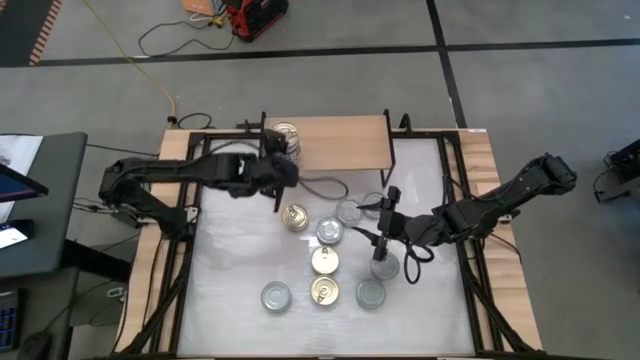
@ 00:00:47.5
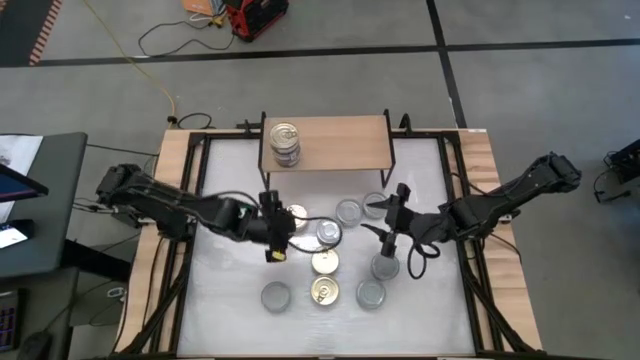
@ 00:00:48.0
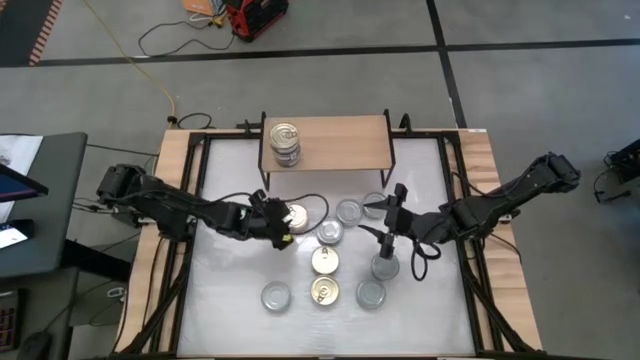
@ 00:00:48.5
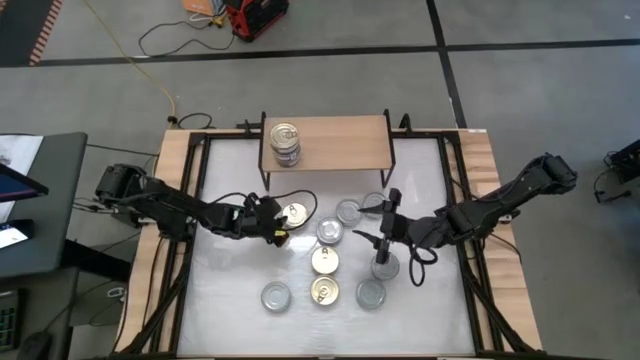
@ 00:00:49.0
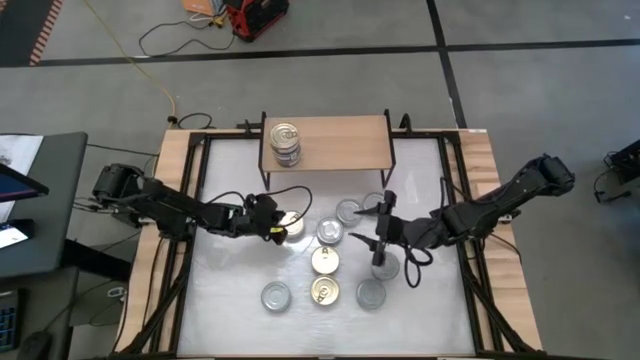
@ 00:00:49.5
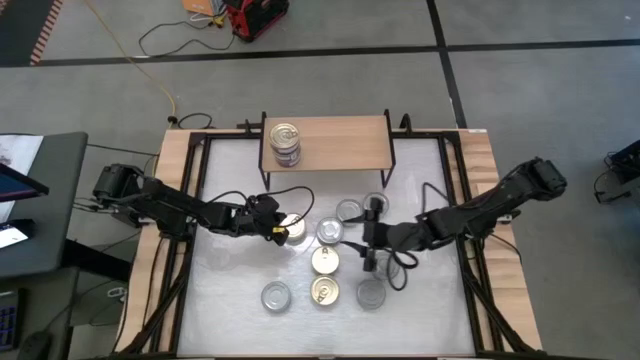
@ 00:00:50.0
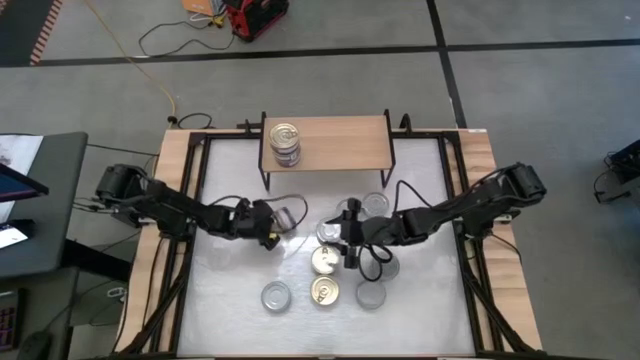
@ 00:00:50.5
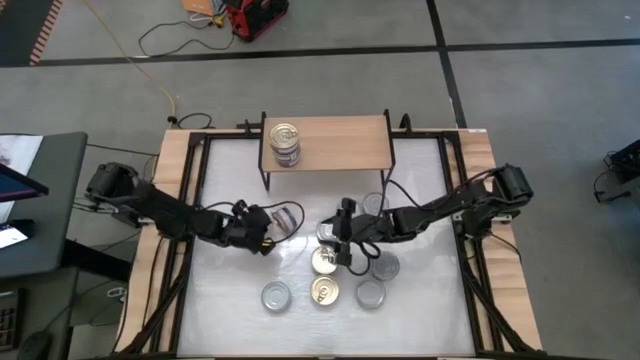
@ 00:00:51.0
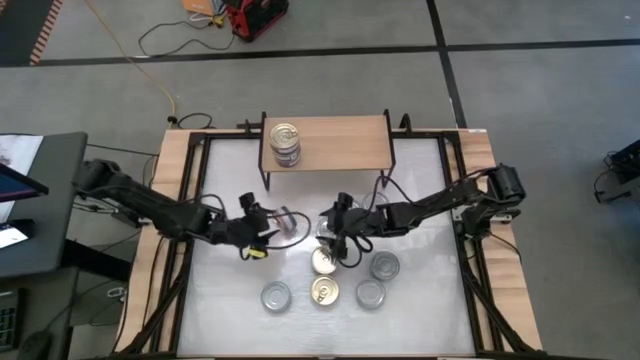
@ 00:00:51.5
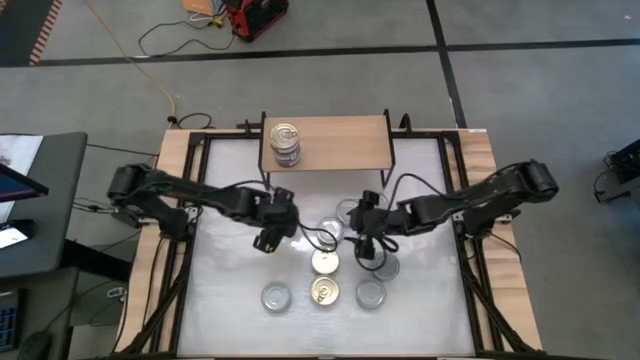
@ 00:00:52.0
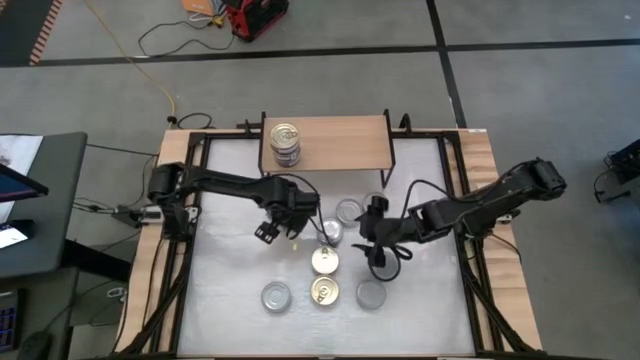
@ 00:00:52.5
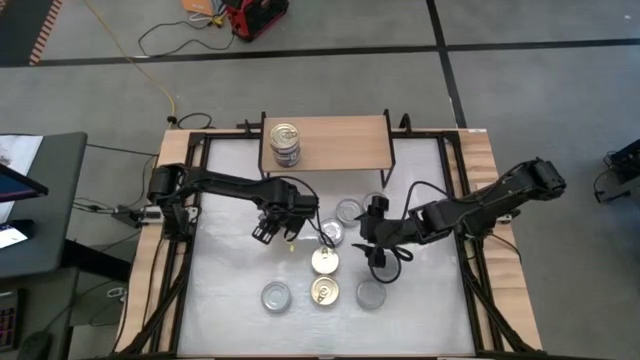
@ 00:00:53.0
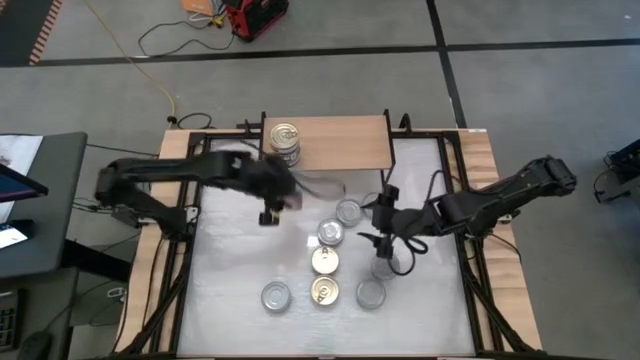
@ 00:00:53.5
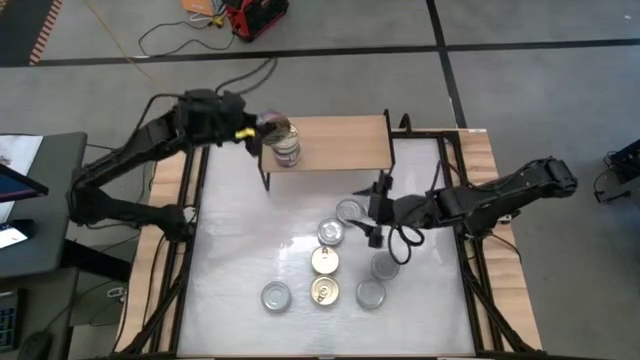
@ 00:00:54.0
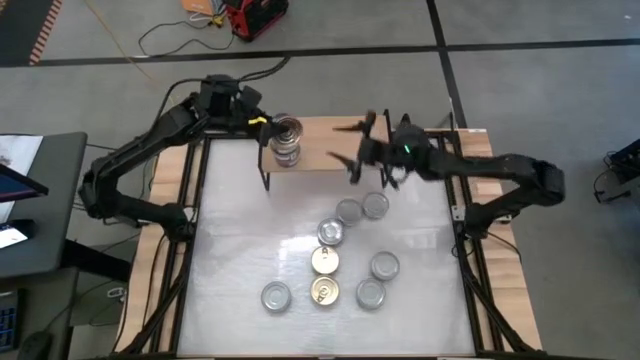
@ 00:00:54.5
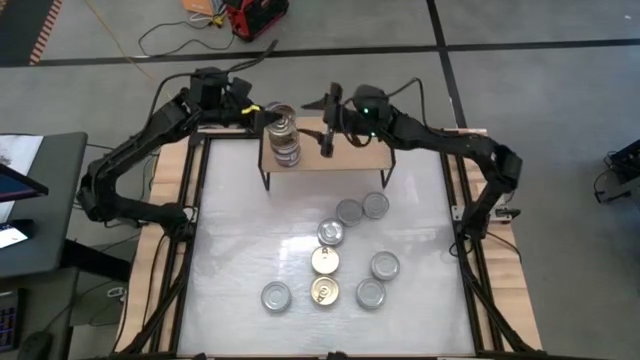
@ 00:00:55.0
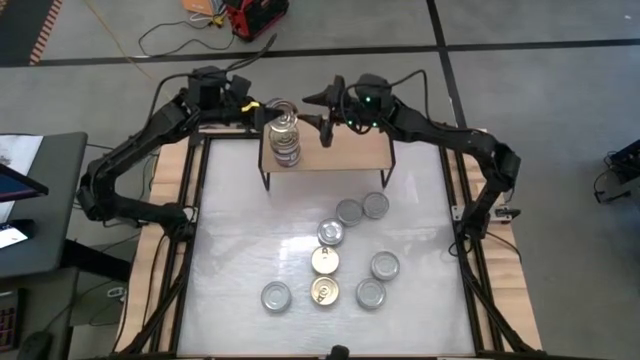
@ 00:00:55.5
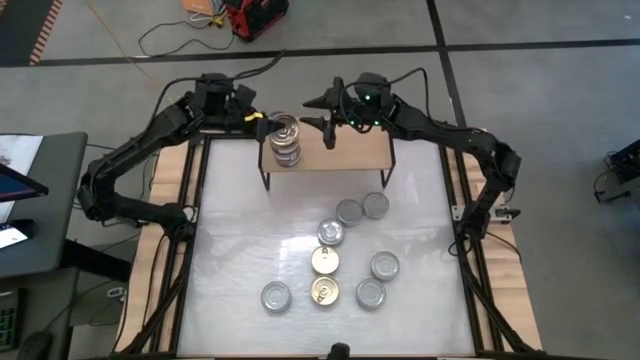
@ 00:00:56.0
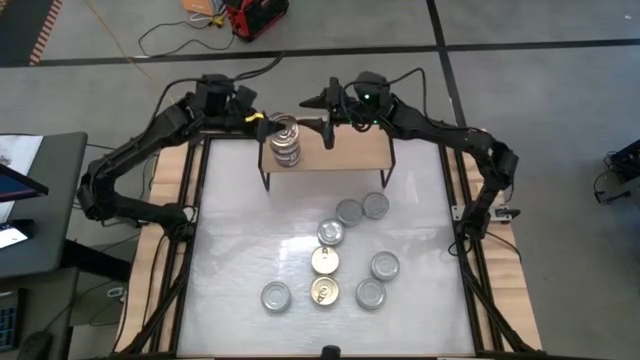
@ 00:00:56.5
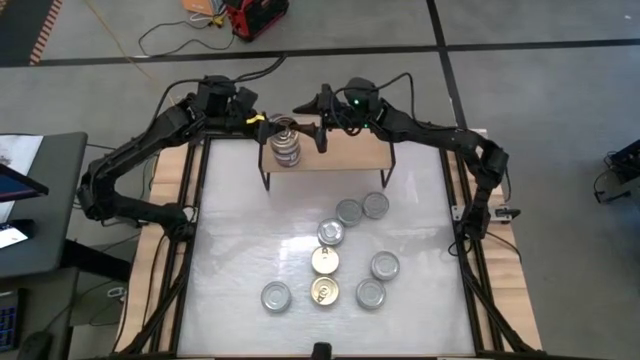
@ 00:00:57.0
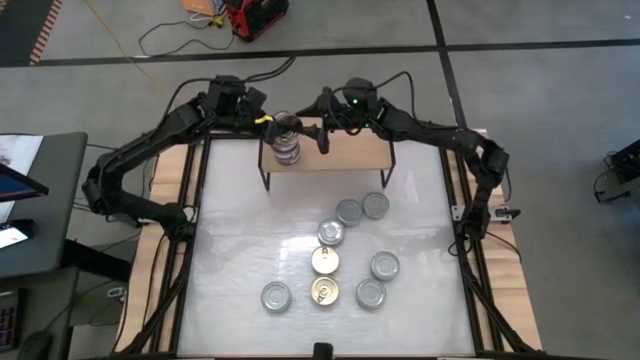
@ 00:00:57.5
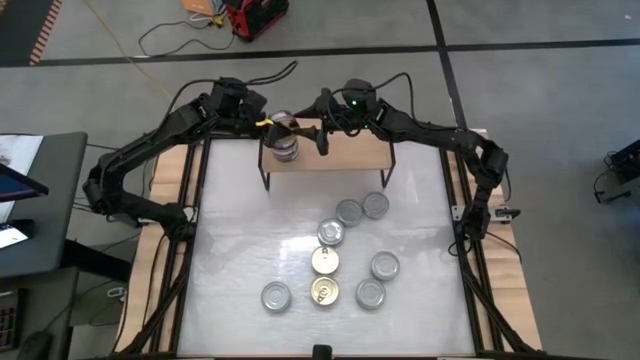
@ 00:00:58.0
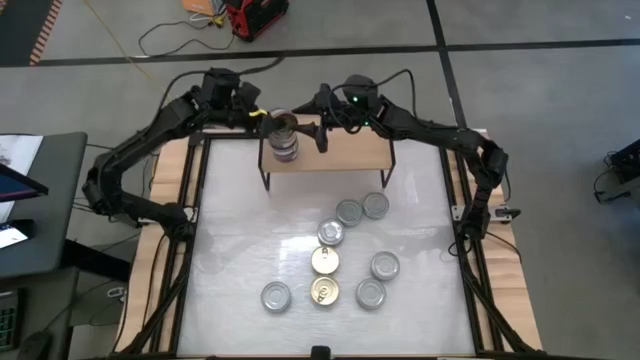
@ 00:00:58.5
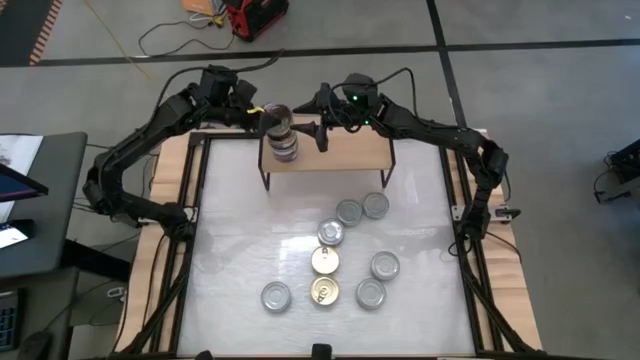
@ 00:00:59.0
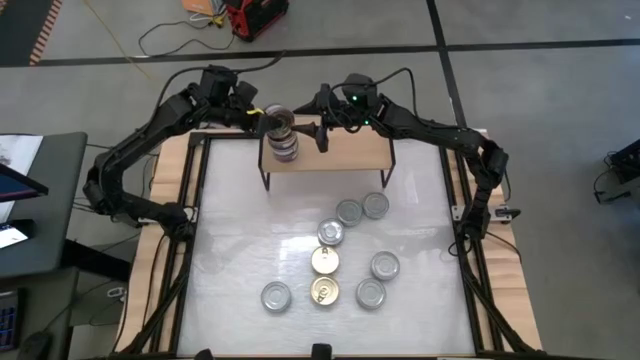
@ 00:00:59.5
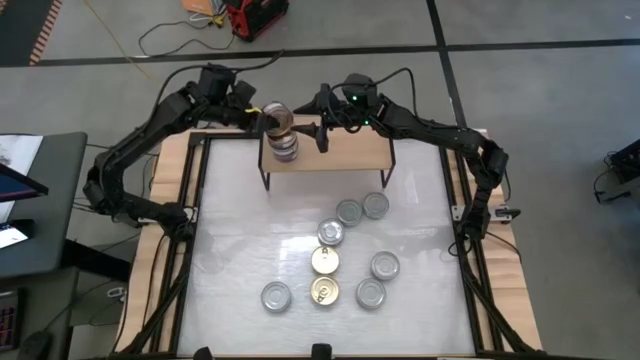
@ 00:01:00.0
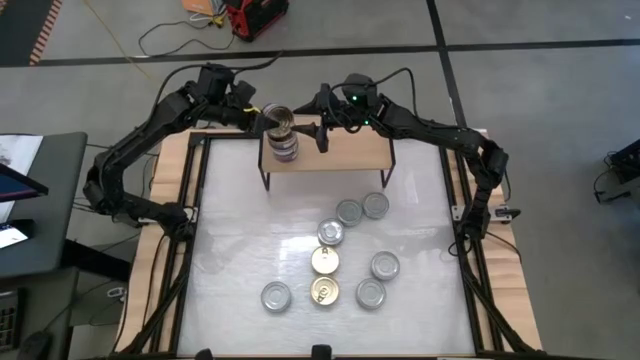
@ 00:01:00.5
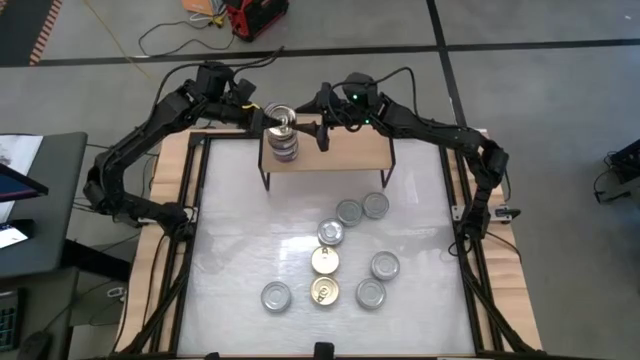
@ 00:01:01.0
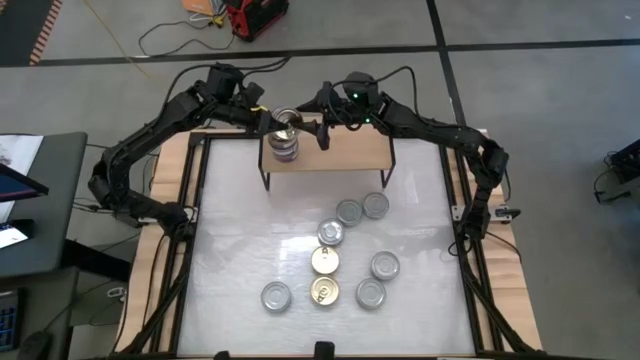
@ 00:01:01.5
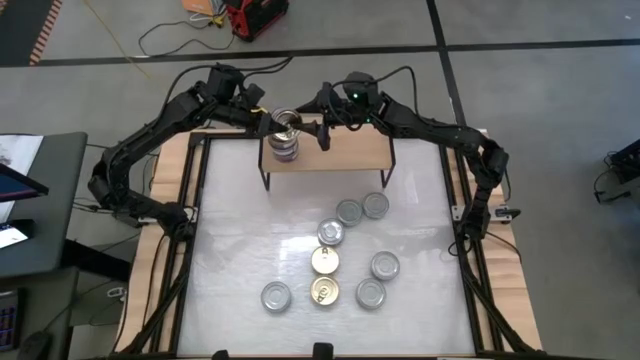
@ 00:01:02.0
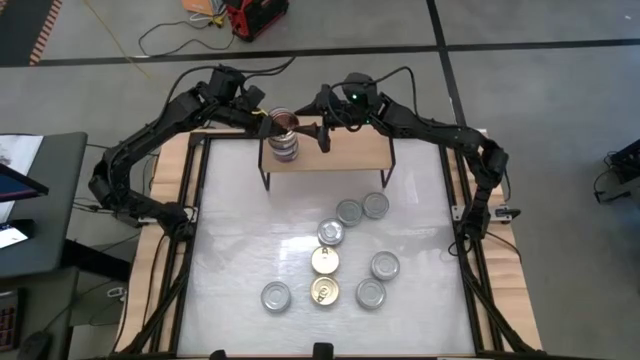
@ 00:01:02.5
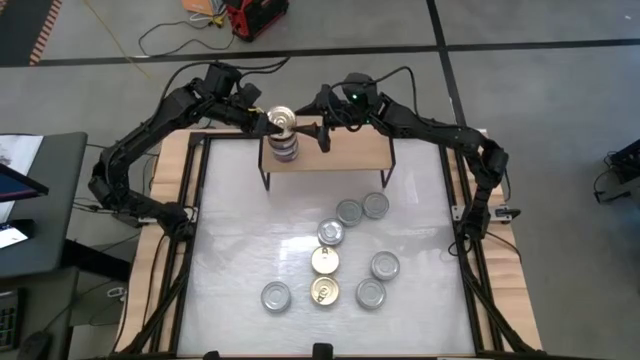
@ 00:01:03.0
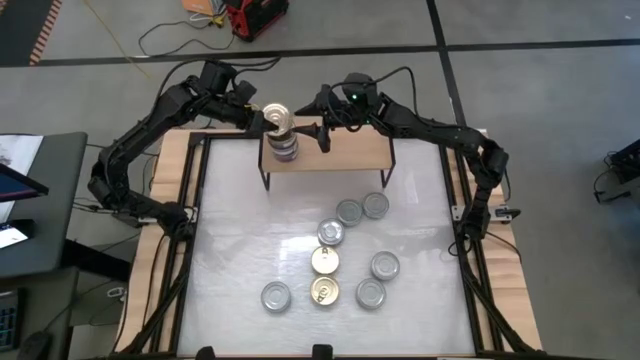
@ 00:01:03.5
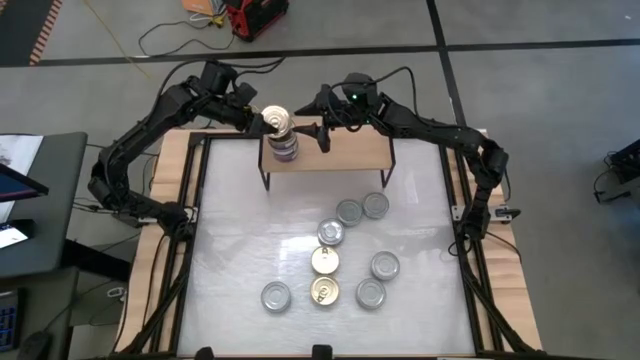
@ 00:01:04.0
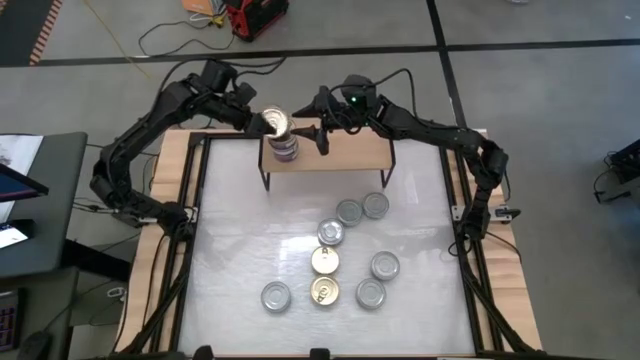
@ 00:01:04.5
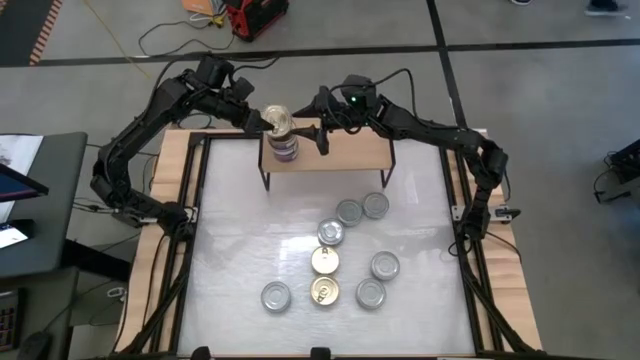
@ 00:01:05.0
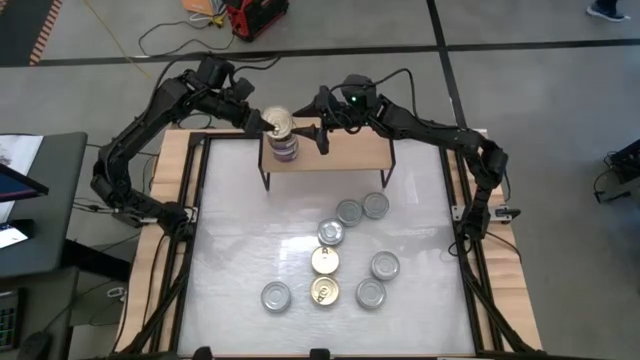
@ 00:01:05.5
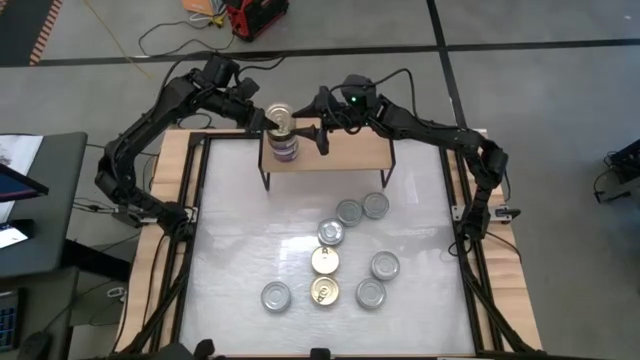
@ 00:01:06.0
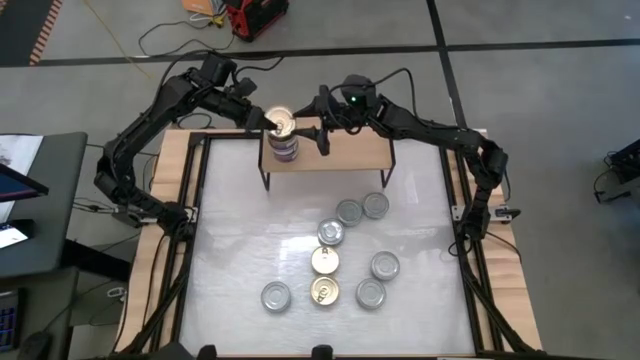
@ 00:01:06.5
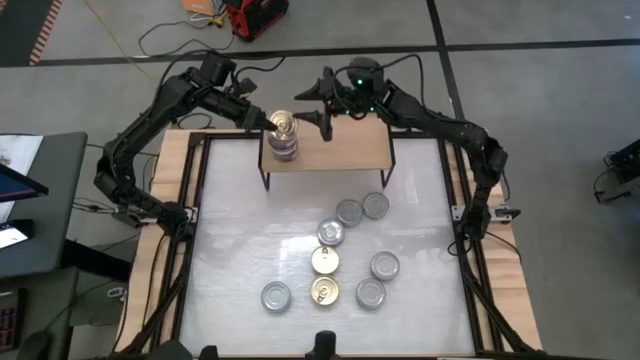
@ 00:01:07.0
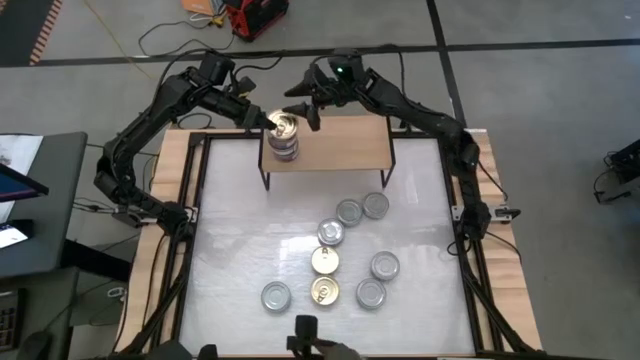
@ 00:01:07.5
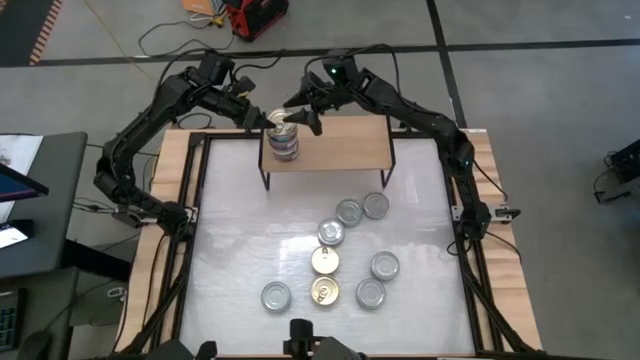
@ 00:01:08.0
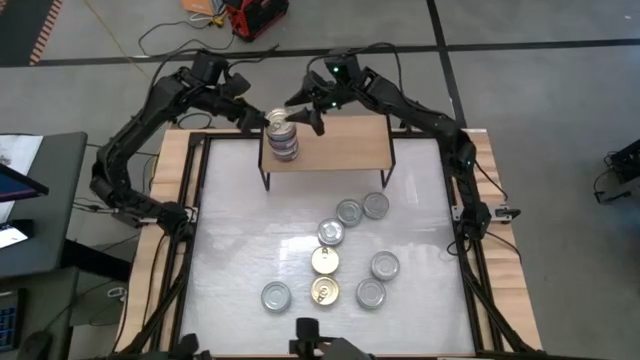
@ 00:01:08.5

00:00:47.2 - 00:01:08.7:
Task: Stack canned seafood by type on shelf
Stack the blue tuna can on top of the blue tuna can
